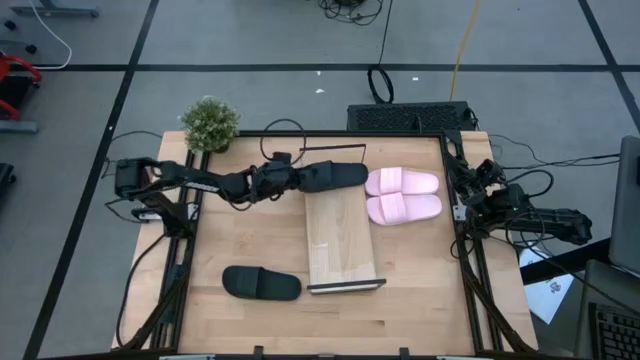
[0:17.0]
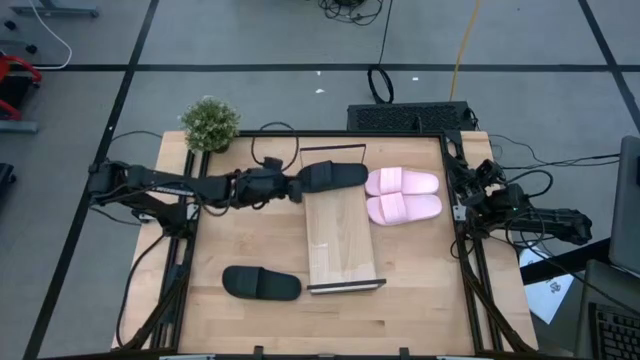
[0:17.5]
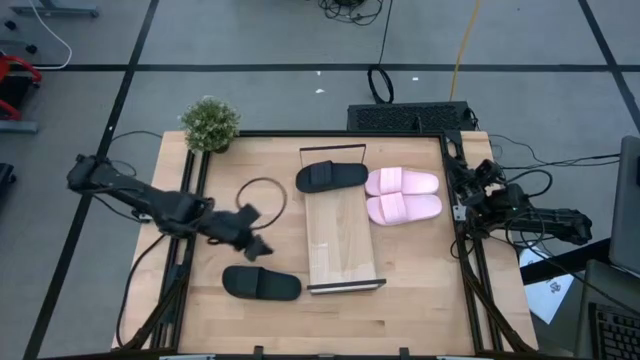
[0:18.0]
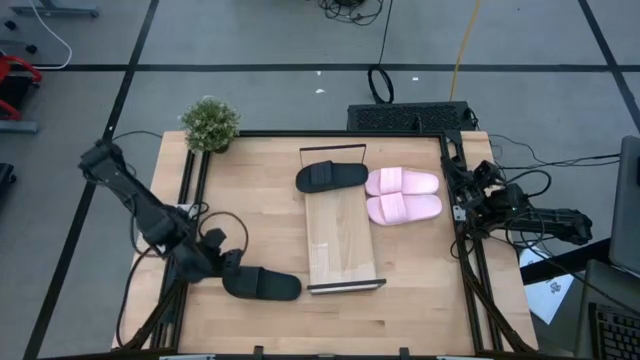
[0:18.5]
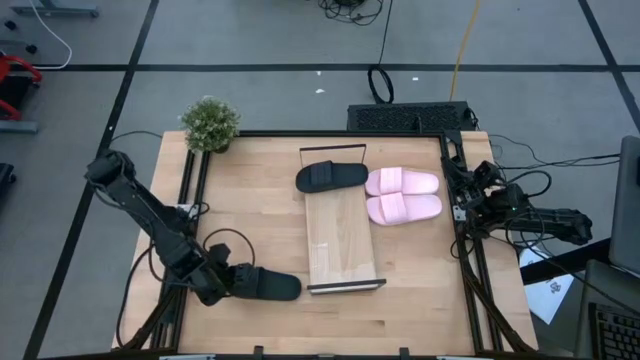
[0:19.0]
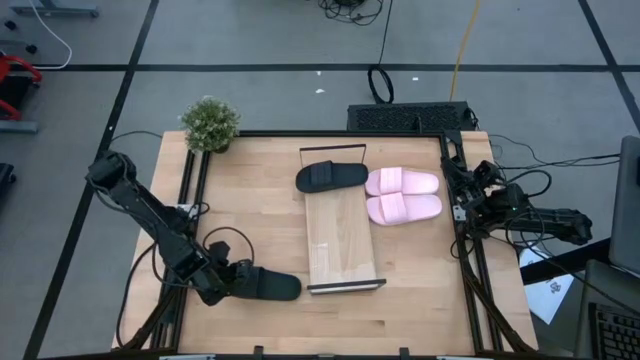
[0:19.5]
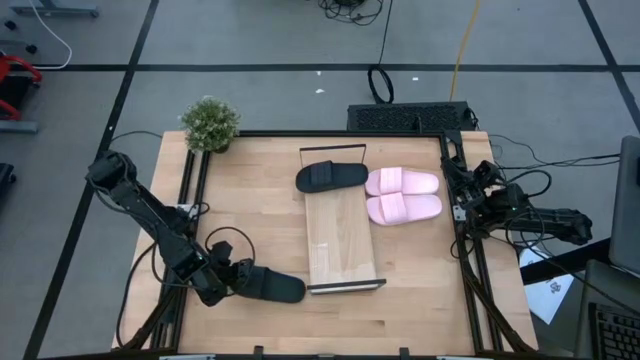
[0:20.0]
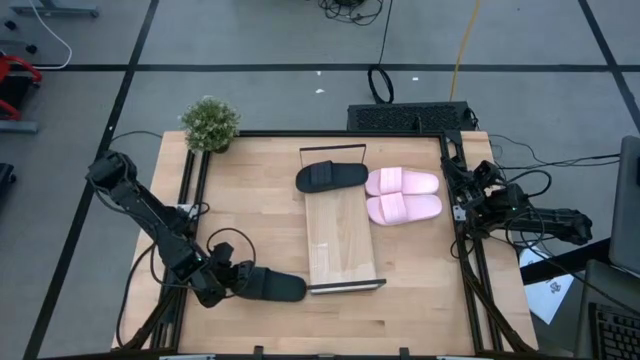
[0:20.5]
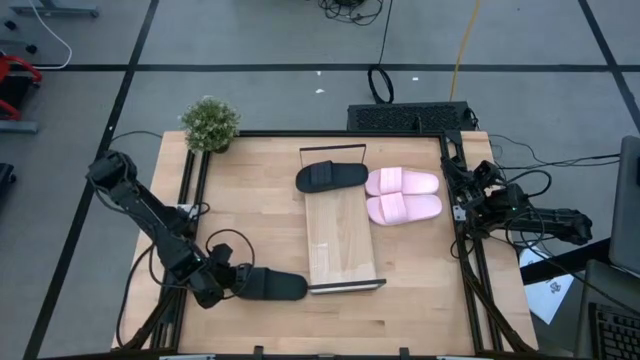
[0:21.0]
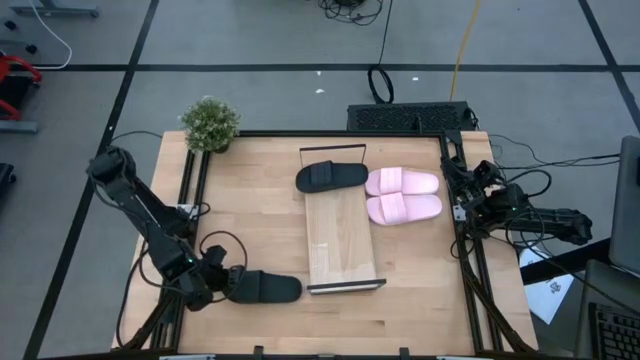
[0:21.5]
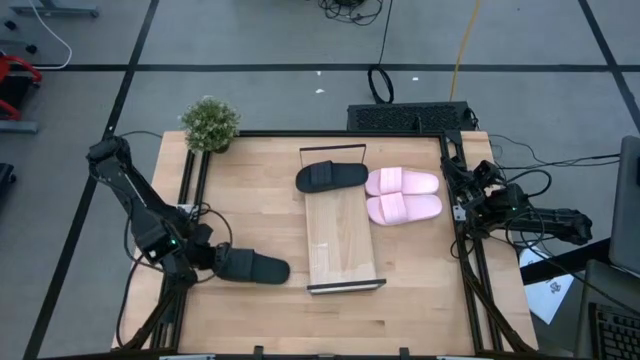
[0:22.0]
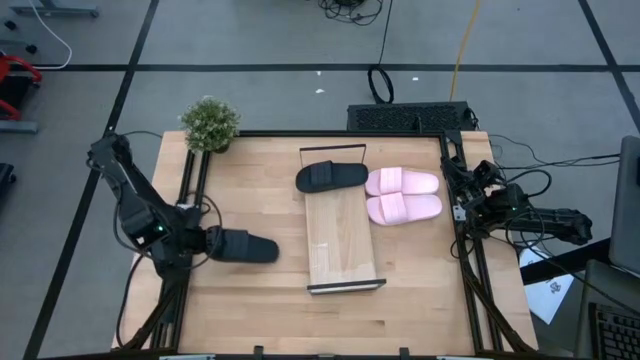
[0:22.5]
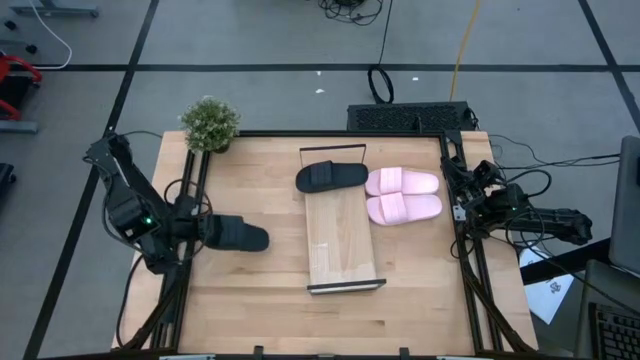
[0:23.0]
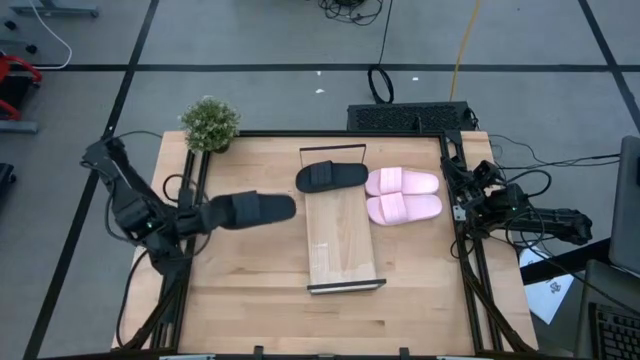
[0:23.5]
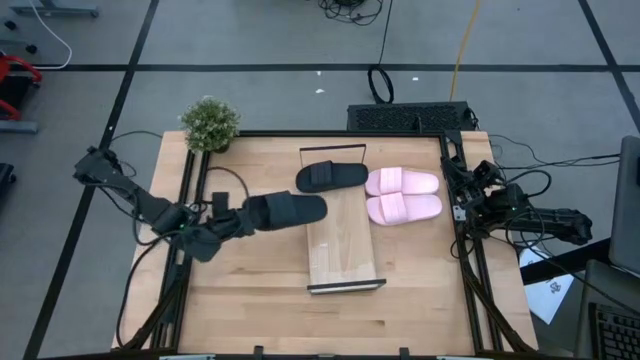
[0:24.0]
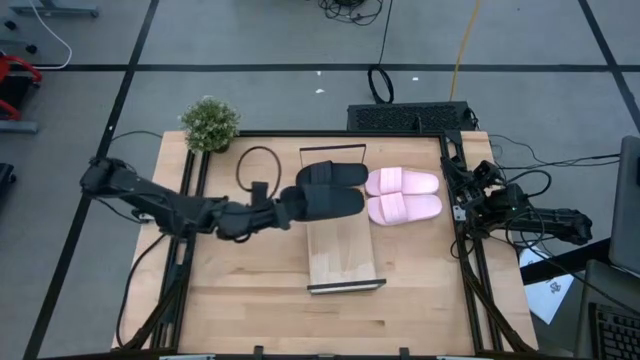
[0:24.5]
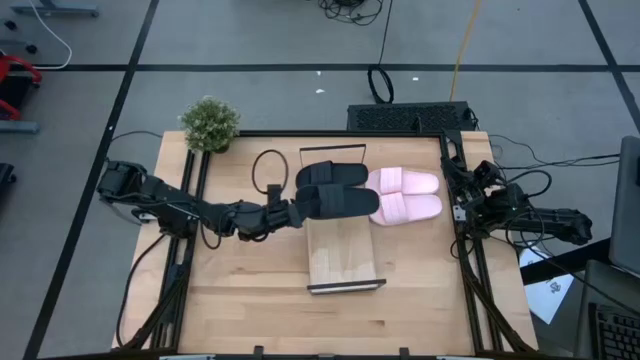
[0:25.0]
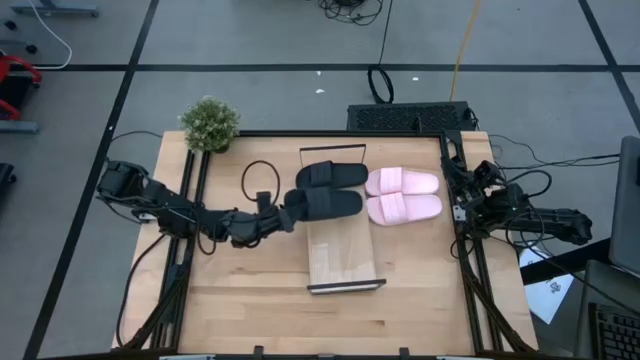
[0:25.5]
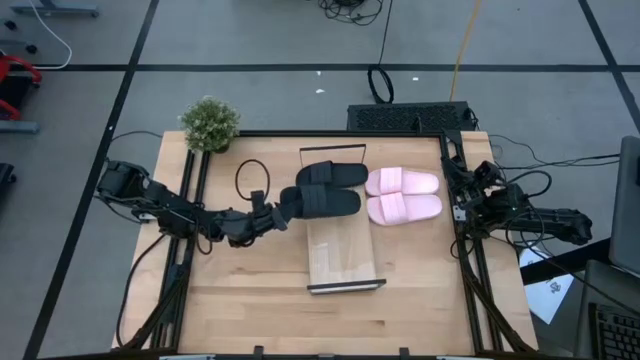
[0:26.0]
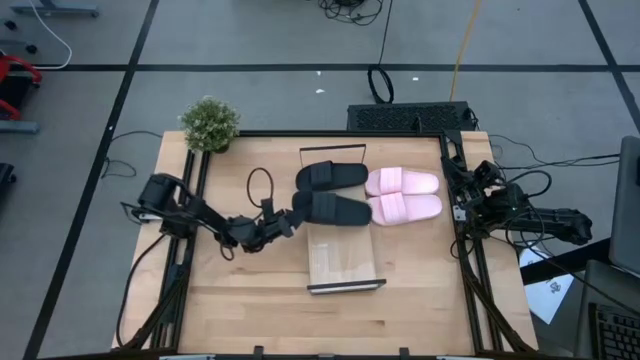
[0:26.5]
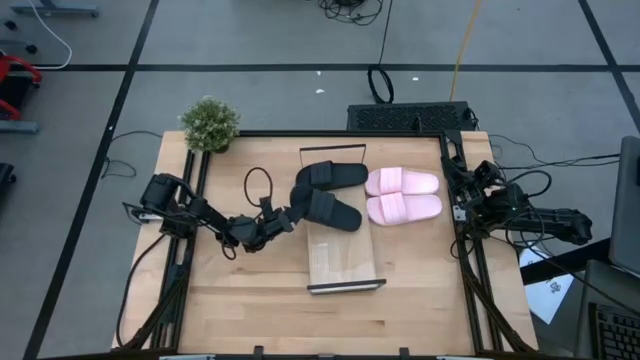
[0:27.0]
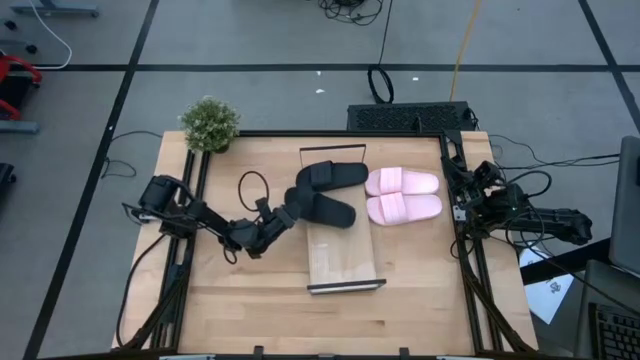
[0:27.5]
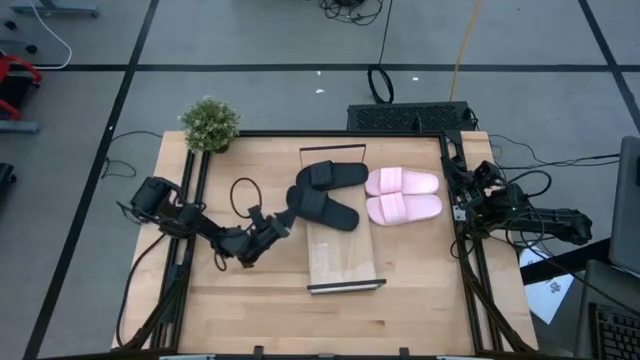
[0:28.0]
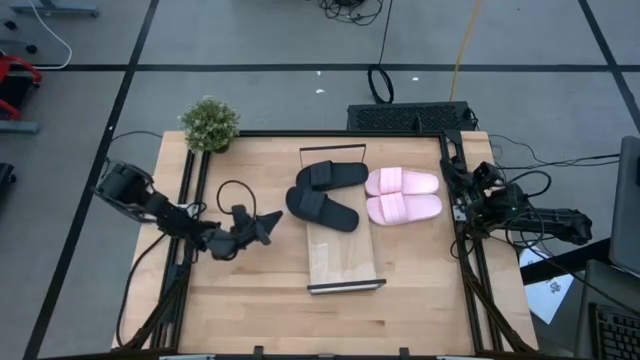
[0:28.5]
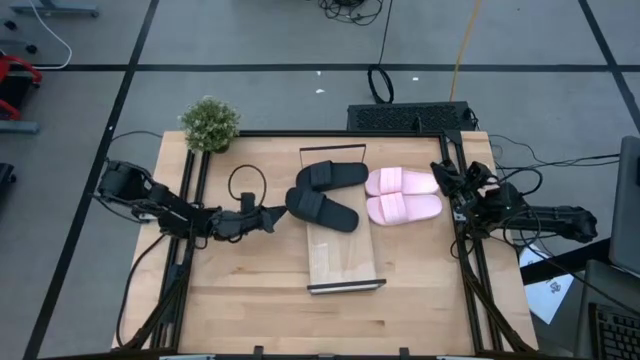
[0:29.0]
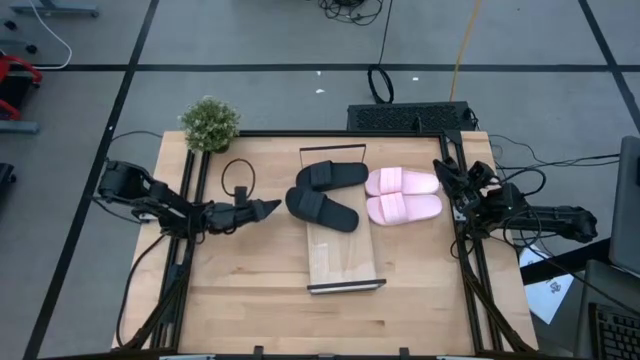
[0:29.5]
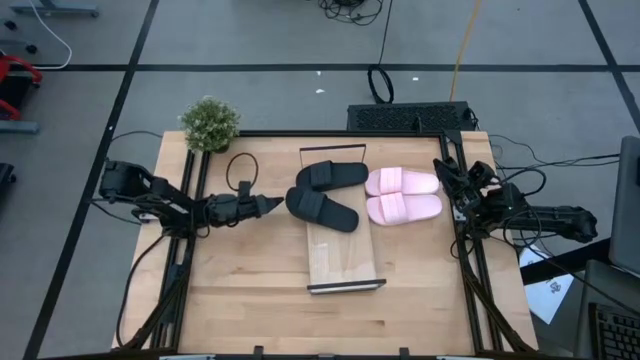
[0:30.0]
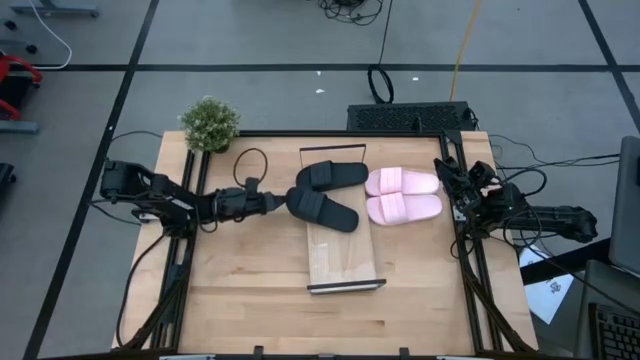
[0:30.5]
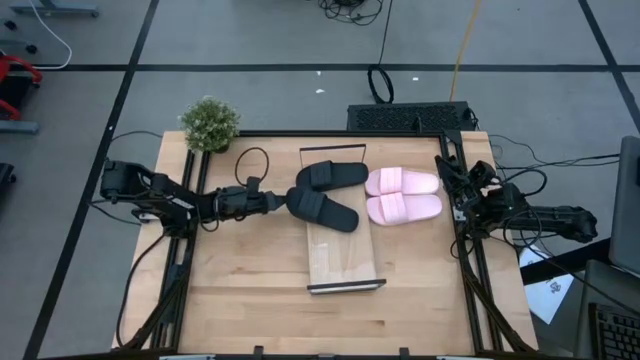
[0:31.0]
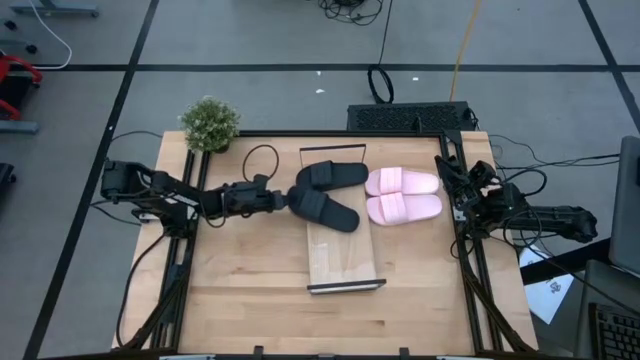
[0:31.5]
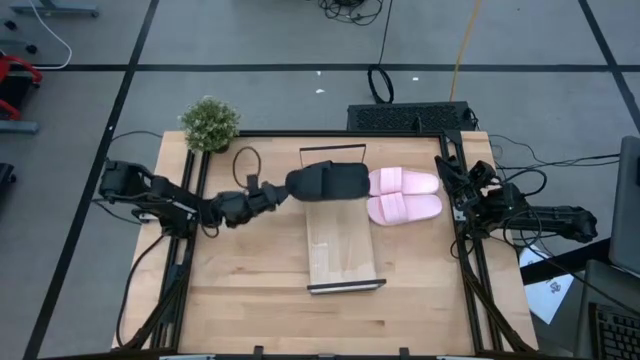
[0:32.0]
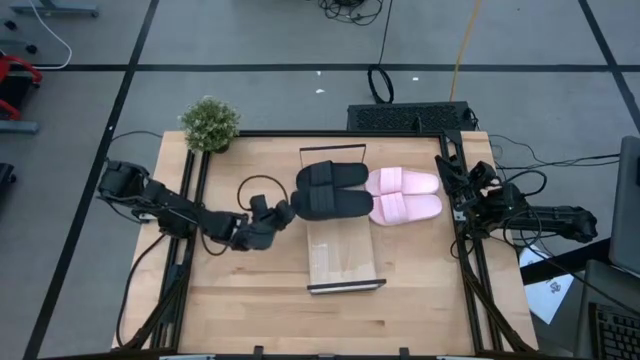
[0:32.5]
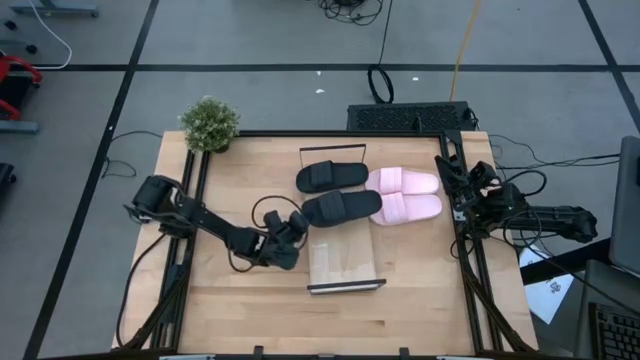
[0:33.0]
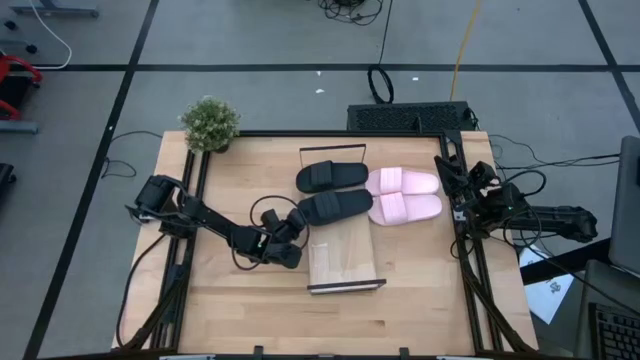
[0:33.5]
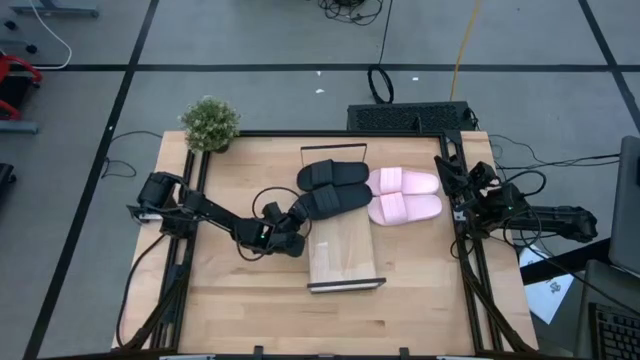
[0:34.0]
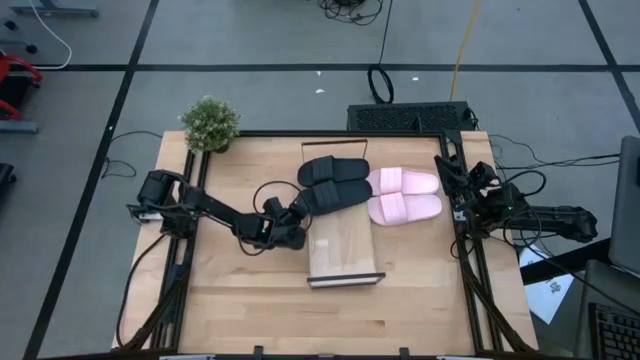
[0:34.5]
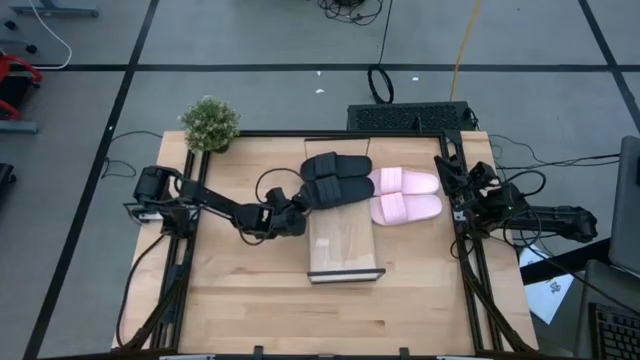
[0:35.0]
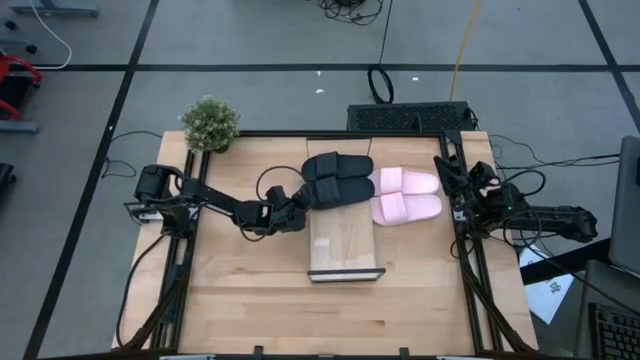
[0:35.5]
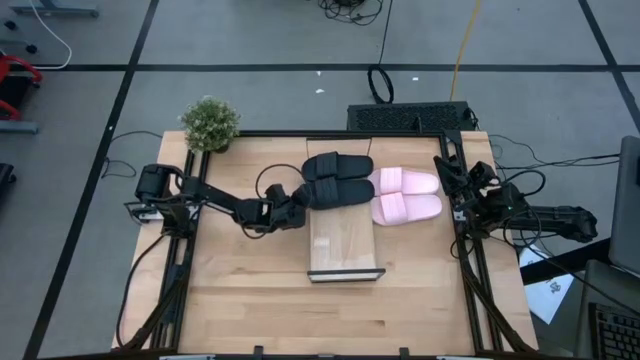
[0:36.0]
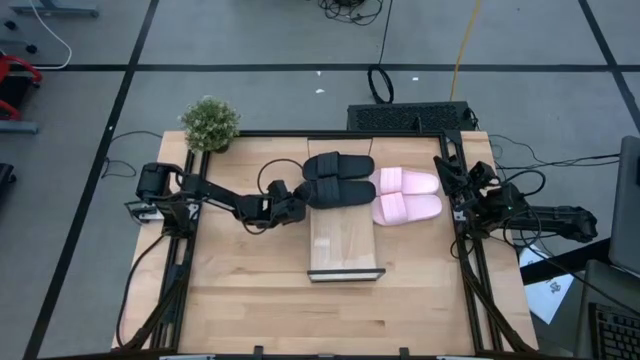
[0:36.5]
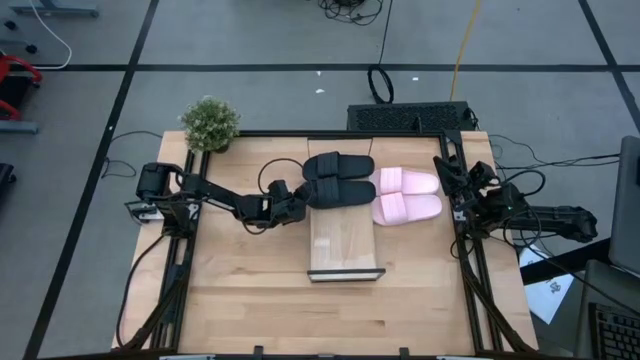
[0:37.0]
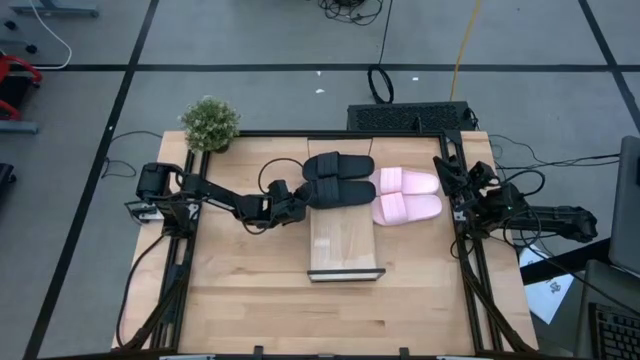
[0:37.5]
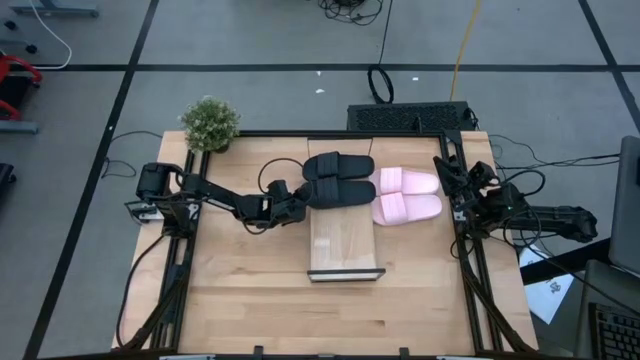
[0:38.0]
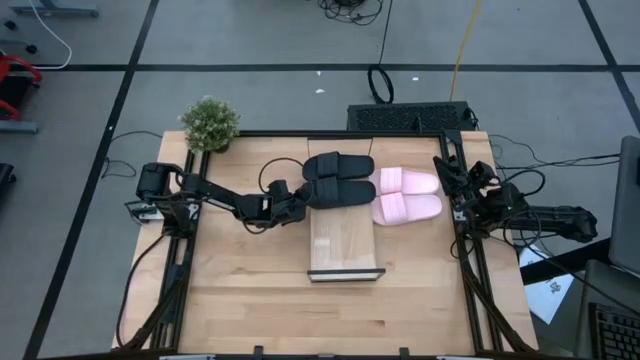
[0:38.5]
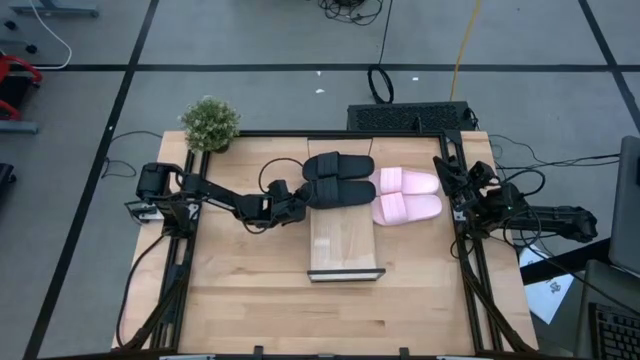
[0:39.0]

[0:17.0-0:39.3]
Task: Pick and place slides into the shelf
Put the black slide on the shelf
